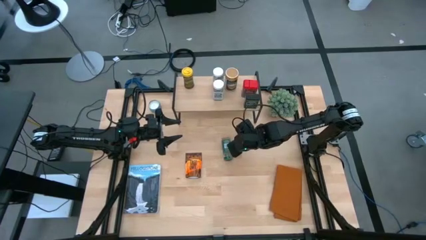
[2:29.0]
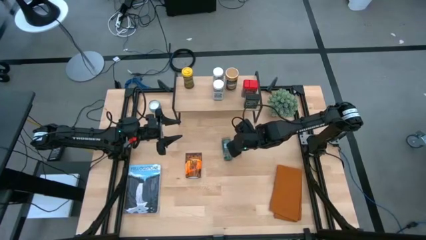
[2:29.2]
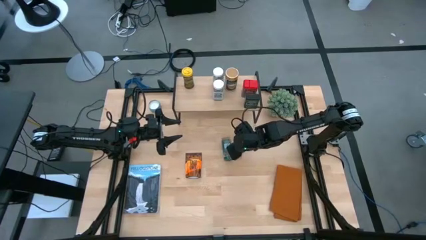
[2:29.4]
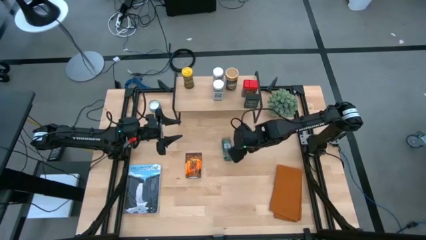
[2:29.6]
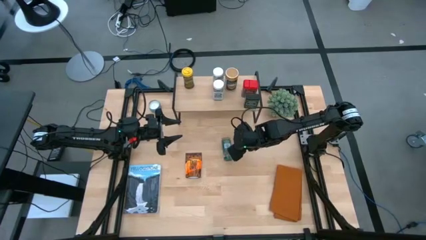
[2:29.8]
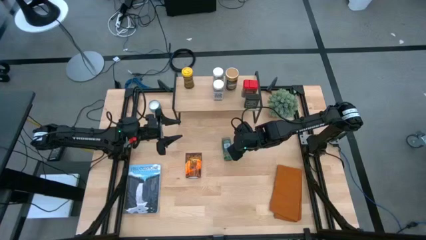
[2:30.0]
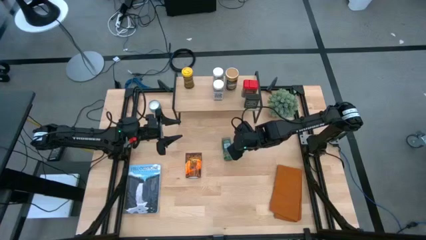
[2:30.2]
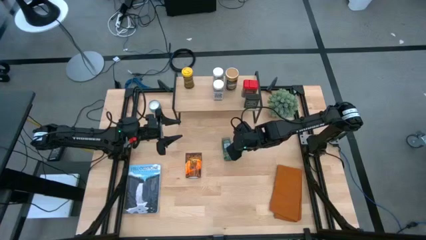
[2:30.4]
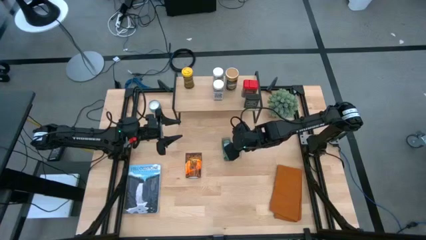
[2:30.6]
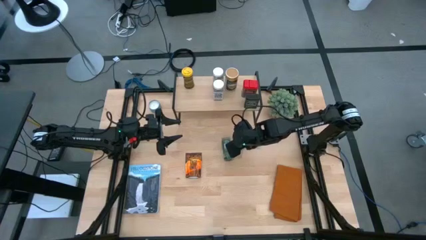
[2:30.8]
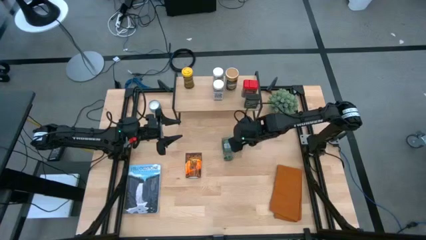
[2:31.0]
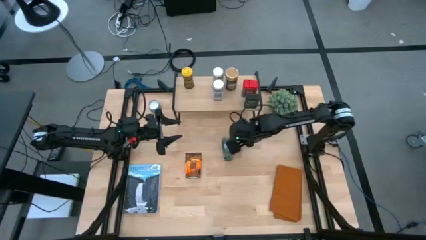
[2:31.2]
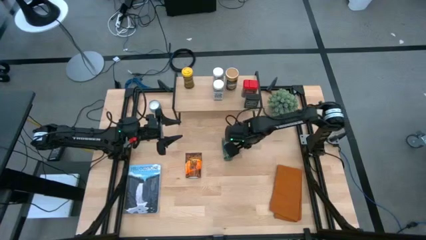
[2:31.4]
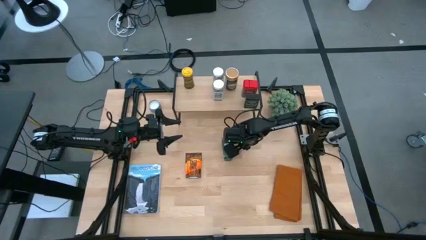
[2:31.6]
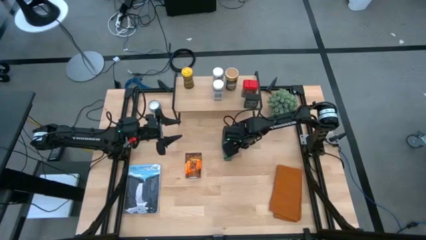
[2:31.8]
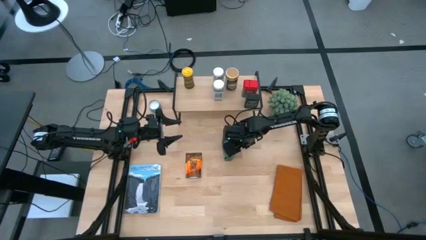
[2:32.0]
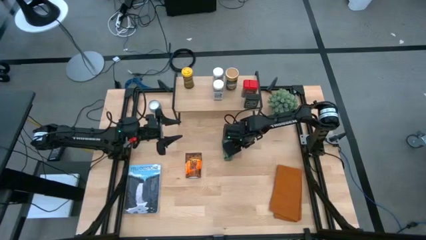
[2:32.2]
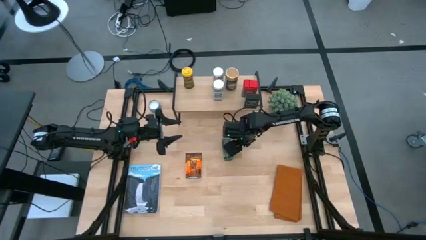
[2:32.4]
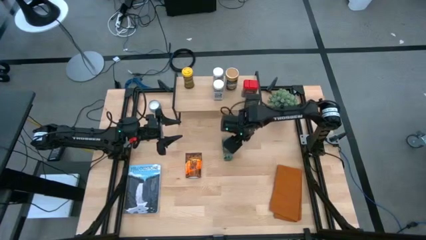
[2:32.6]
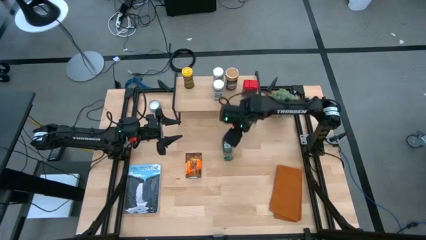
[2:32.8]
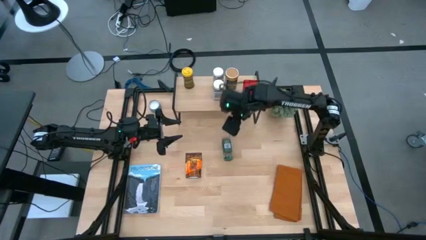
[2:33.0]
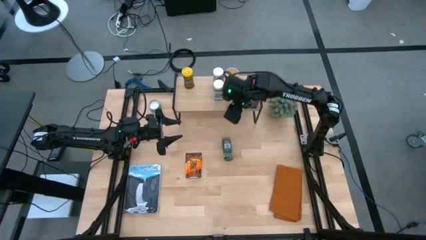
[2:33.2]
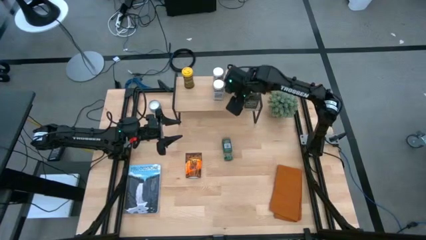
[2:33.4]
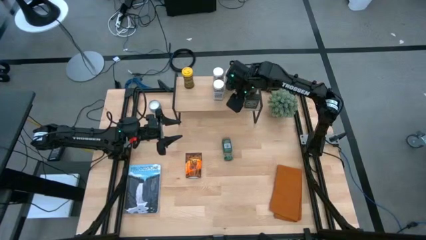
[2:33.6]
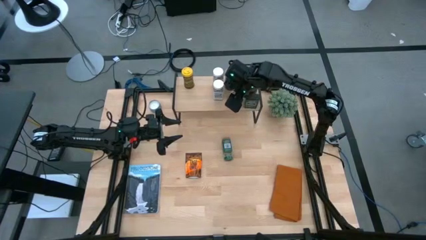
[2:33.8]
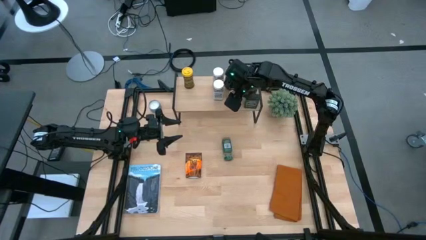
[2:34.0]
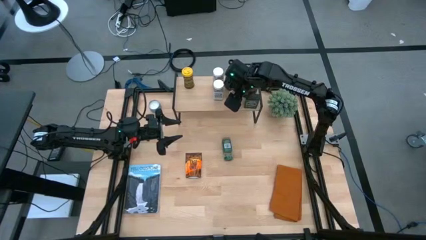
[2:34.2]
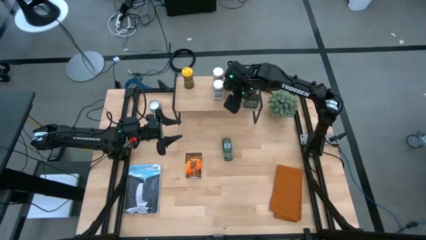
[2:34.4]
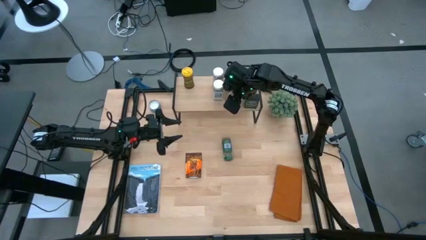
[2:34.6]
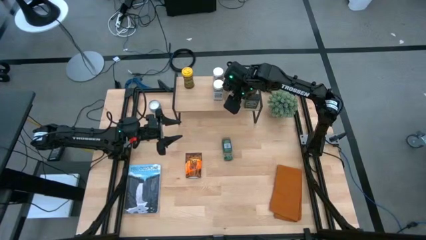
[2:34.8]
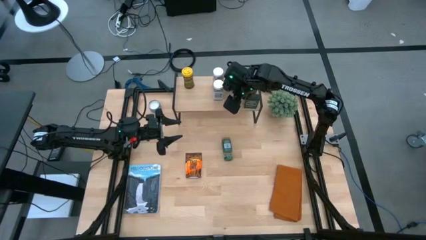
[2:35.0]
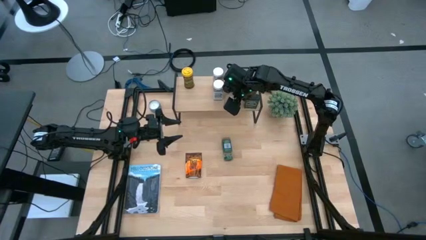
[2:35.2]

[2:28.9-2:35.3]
Task: Shelf spices
Put the brown bottle seasoning on the shelf

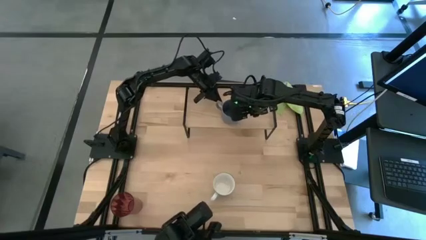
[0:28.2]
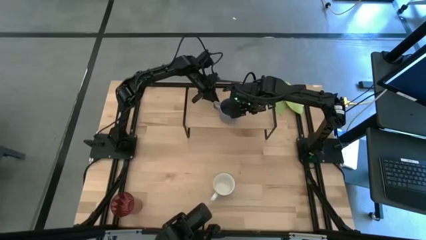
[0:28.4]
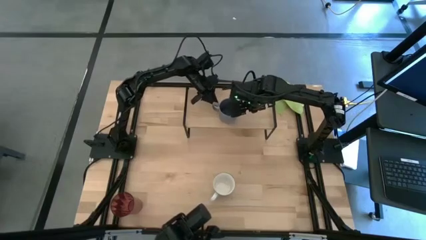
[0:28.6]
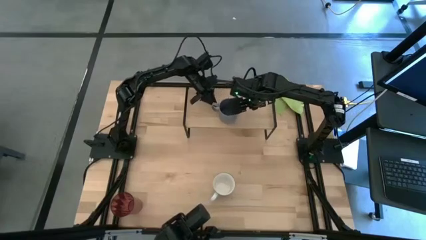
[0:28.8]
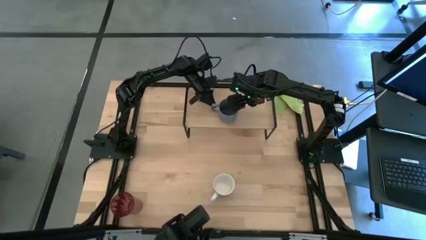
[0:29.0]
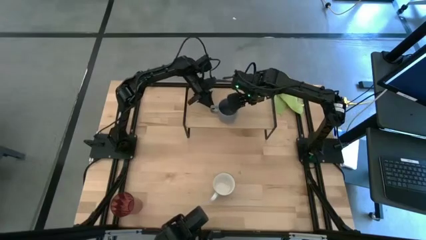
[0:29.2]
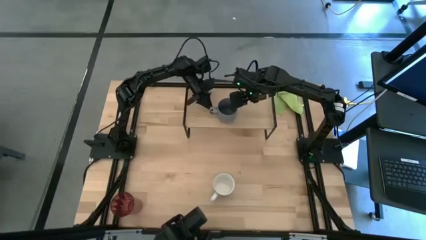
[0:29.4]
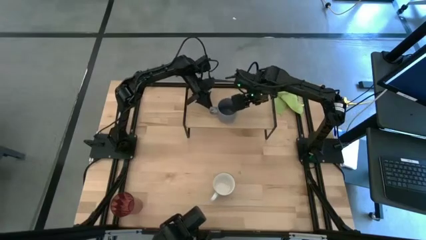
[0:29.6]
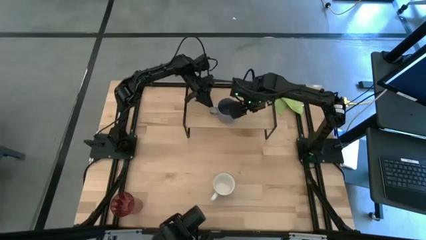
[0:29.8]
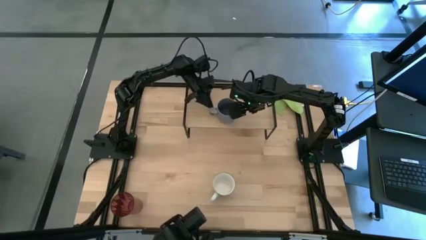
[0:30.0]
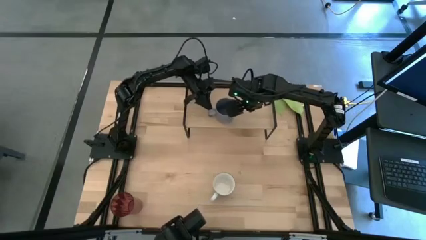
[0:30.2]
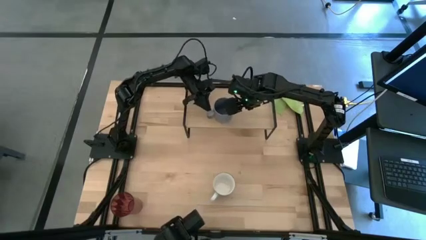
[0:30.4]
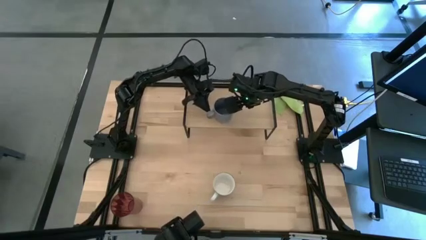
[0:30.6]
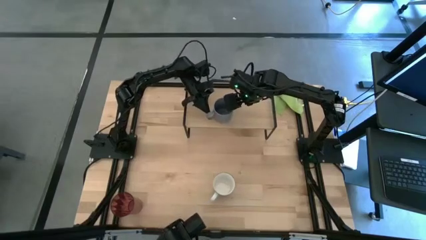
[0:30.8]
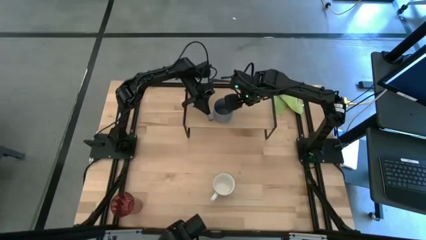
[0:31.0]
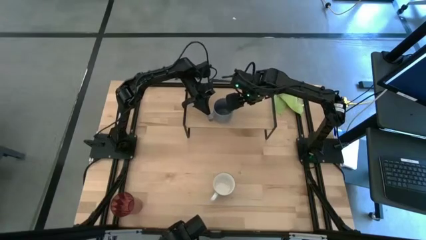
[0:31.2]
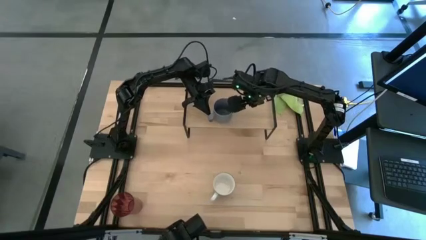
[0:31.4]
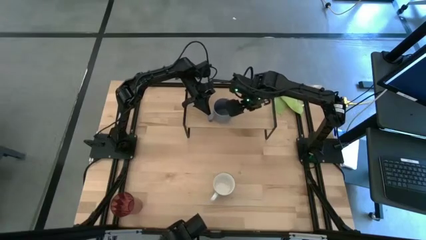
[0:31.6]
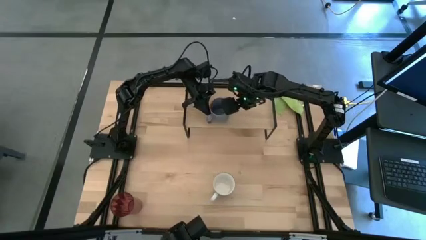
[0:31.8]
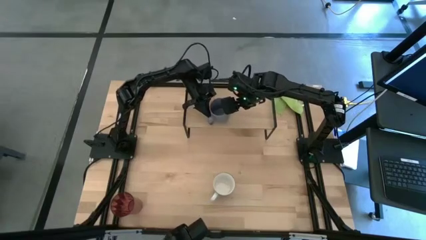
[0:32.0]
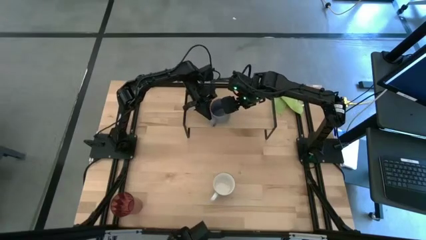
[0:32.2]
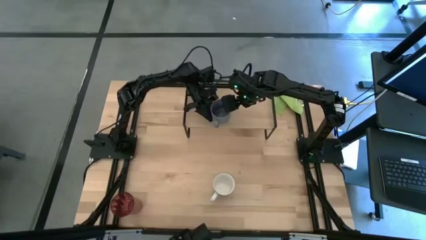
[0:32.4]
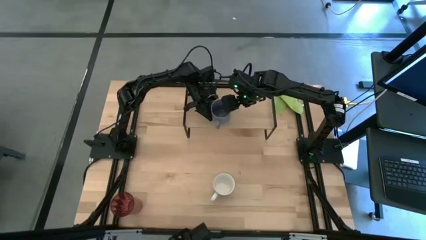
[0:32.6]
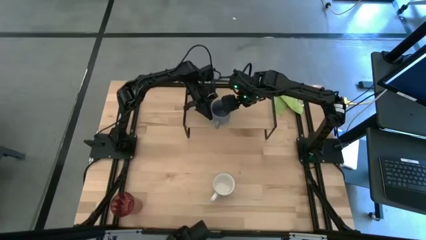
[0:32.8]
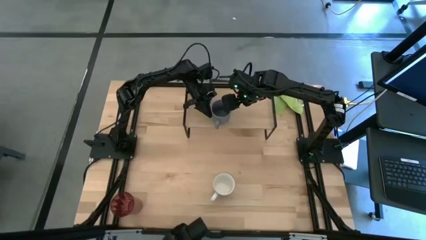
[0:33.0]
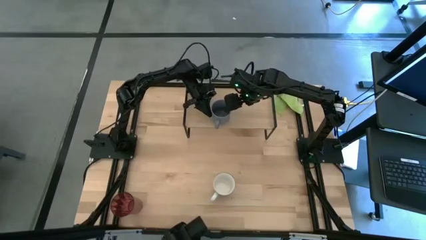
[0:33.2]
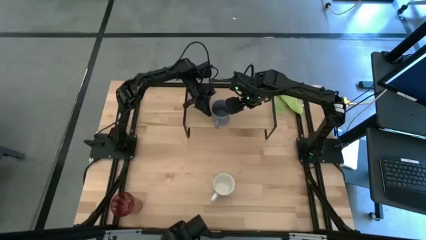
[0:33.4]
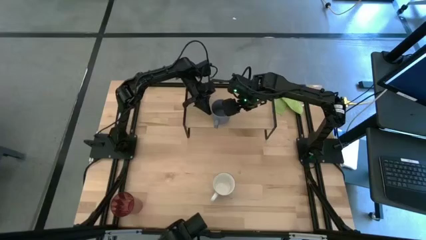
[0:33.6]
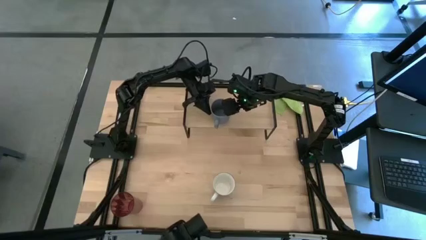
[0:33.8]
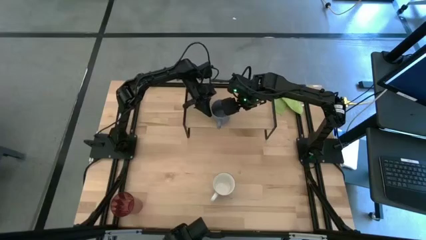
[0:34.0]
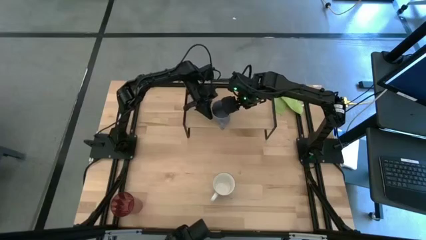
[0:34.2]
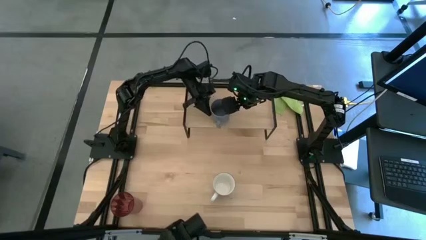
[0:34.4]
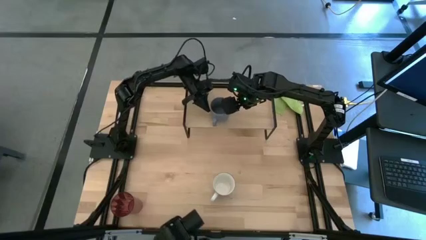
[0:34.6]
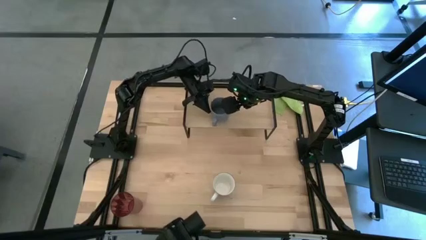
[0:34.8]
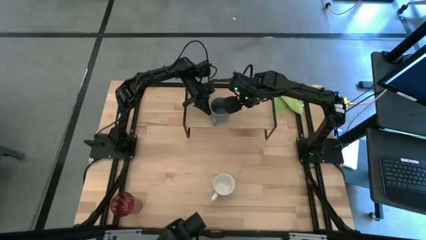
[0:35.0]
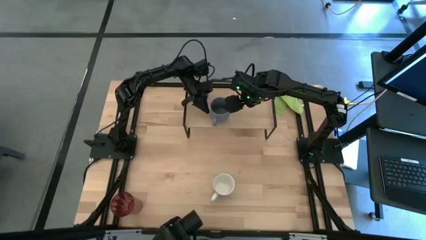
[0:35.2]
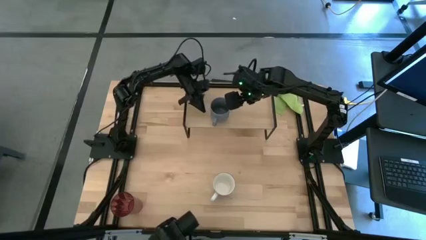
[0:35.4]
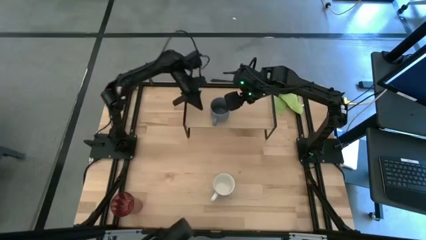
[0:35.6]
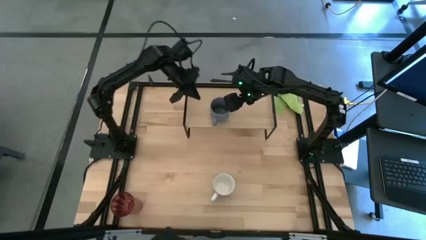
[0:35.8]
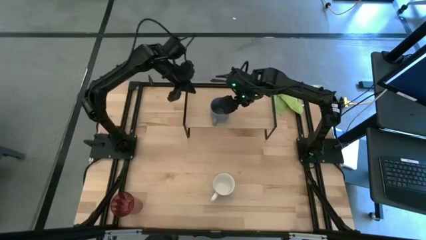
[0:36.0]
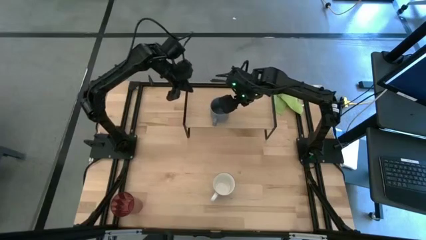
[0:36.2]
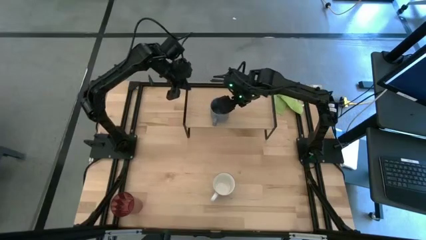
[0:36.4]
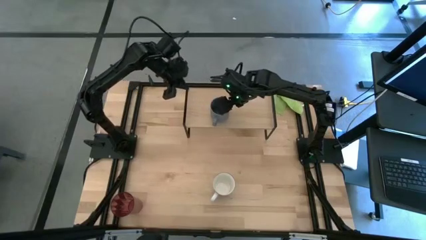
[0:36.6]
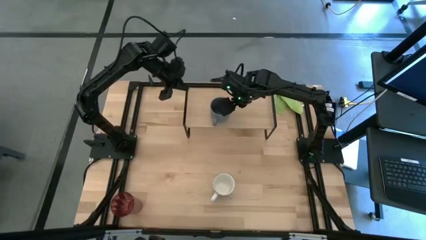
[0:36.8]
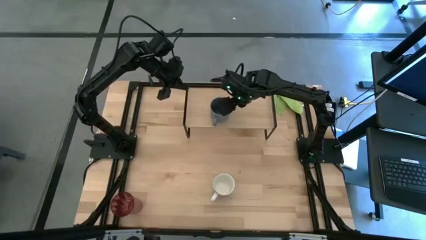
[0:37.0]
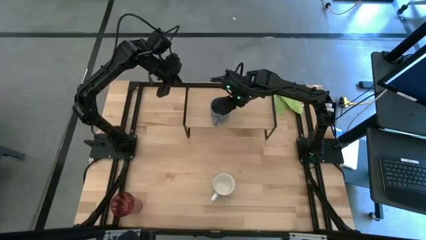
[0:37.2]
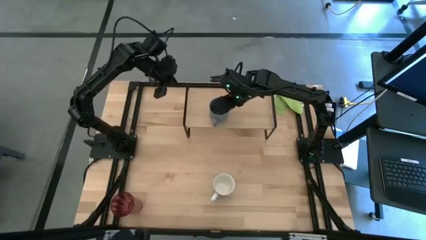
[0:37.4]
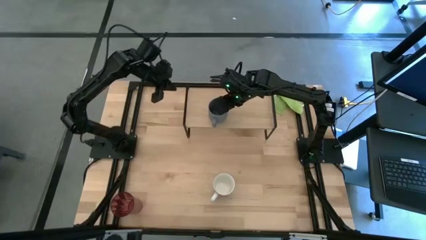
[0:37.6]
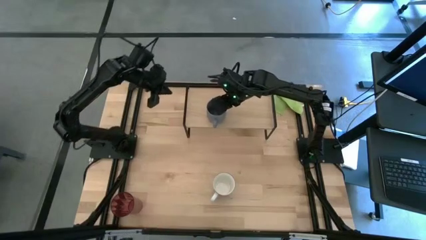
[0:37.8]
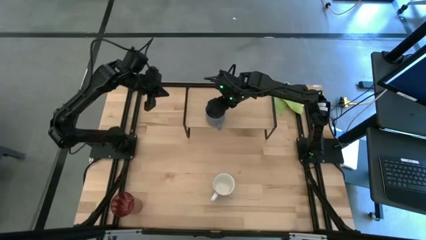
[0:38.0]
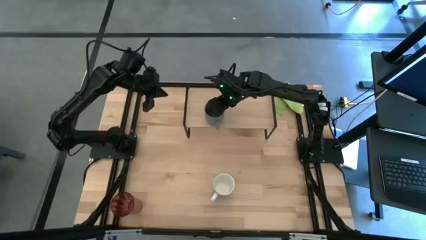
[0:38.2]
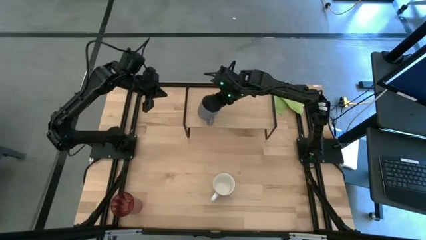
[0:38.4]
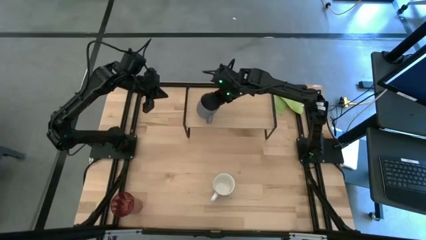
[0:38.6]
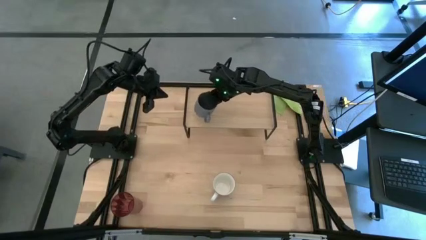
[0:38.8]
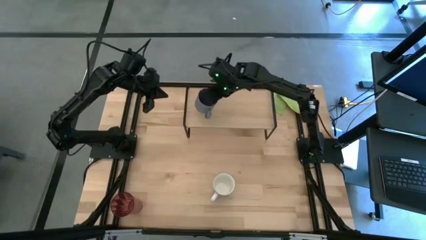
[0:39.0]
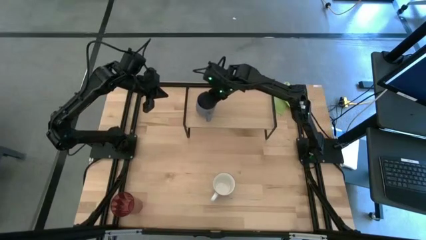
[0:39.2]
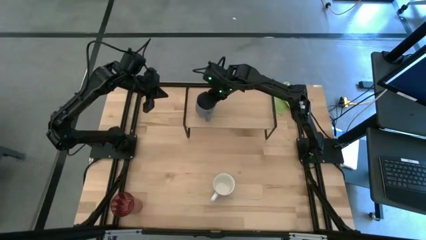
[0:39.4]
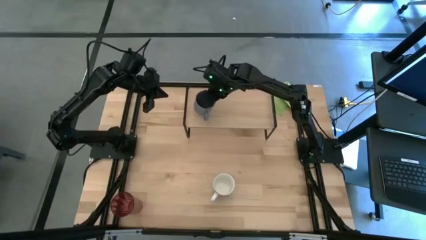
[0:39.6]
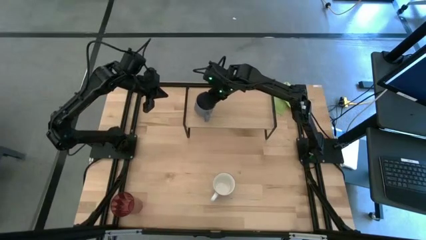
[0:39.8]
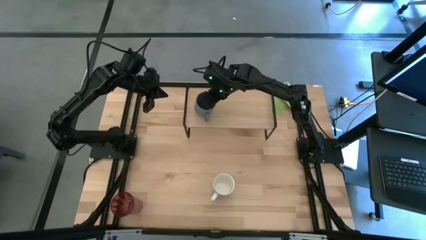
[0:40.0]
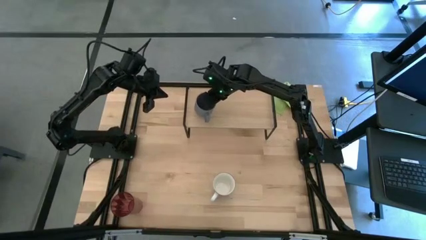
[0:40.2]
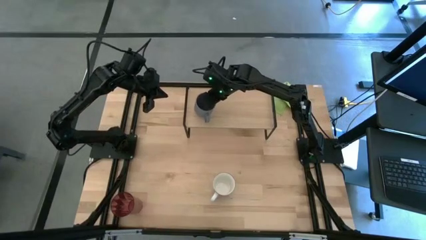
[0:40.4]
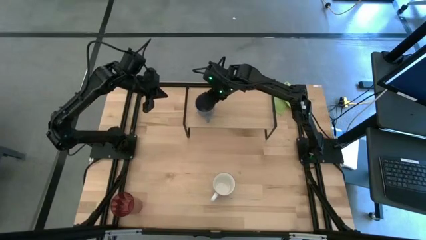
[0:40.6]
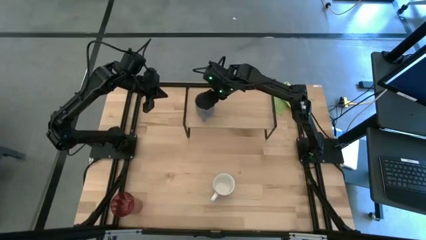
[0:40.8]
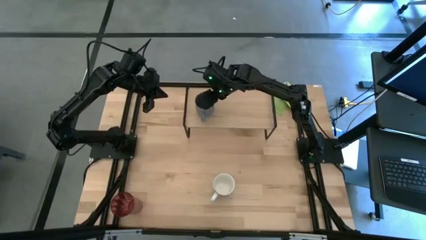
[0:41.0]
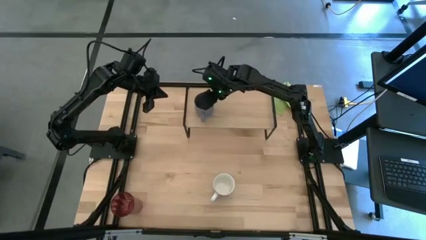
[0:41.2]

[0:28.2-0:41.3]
Task: Stack small to large cups/mugs on shelf
Put the blue mug on the shelf
